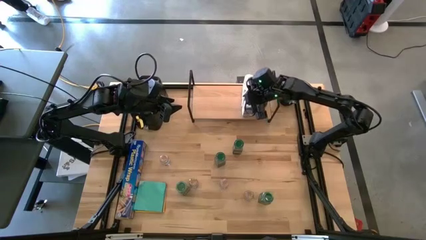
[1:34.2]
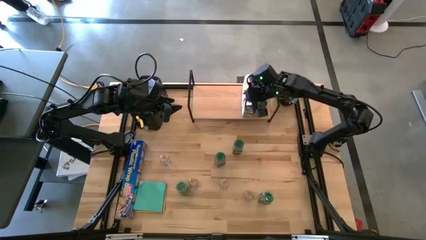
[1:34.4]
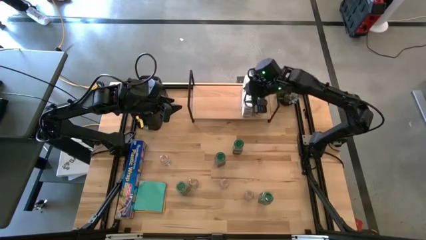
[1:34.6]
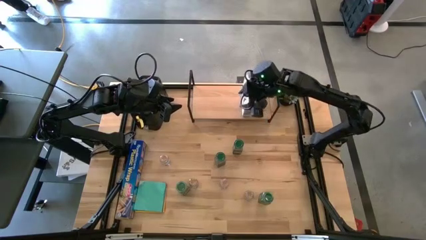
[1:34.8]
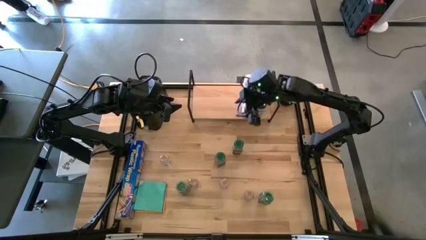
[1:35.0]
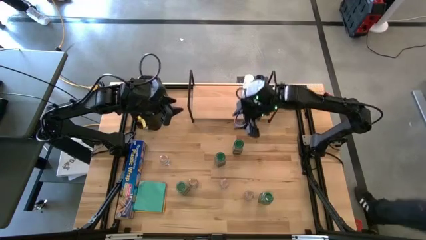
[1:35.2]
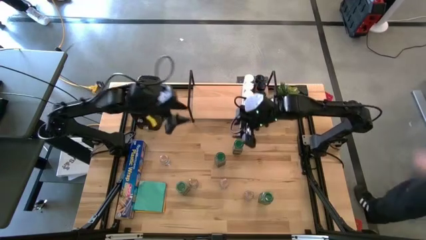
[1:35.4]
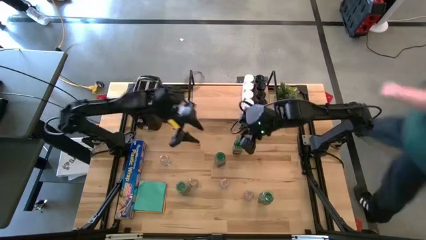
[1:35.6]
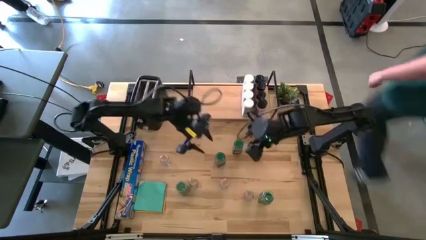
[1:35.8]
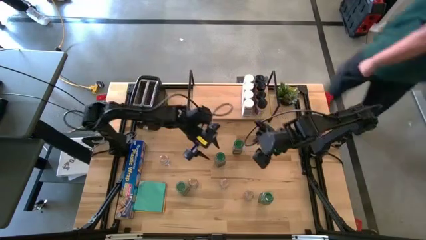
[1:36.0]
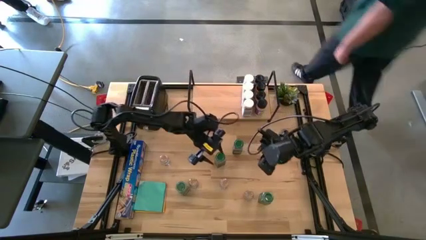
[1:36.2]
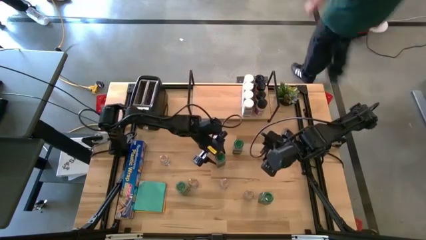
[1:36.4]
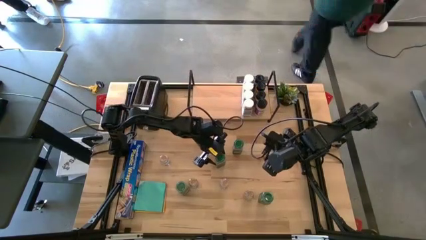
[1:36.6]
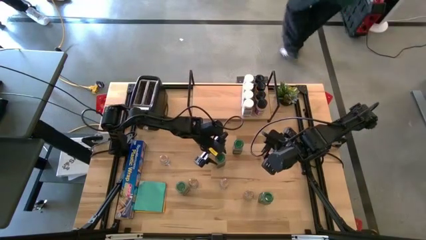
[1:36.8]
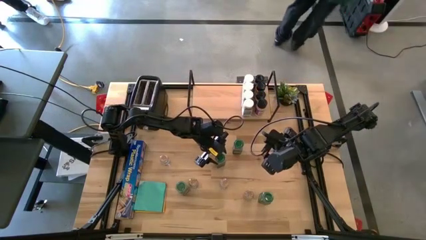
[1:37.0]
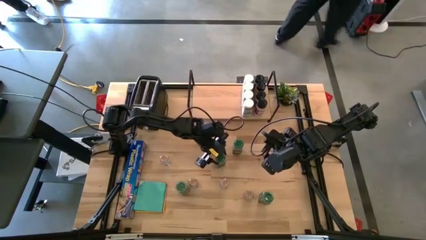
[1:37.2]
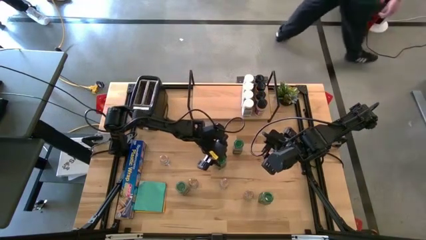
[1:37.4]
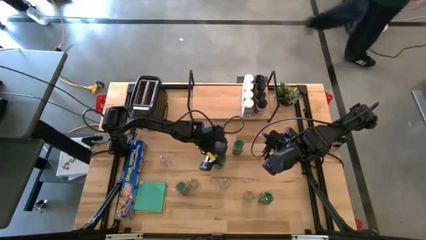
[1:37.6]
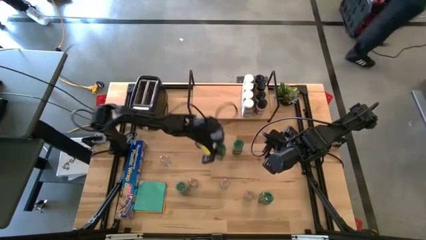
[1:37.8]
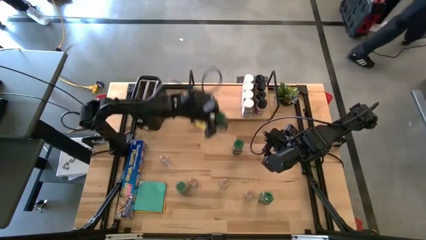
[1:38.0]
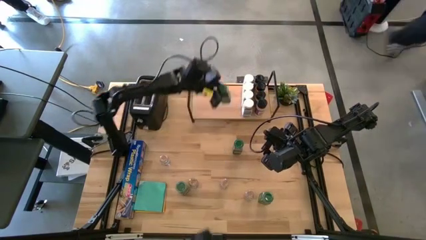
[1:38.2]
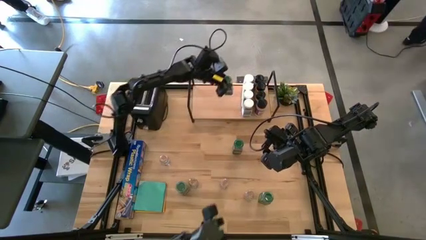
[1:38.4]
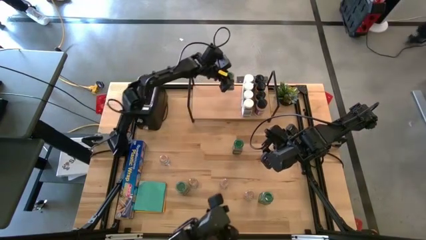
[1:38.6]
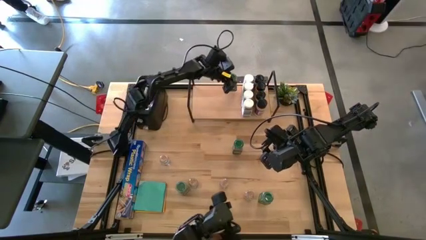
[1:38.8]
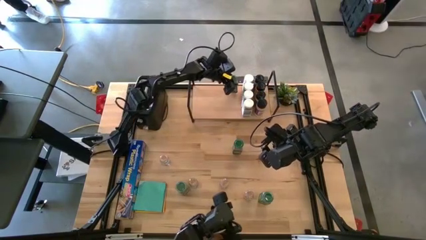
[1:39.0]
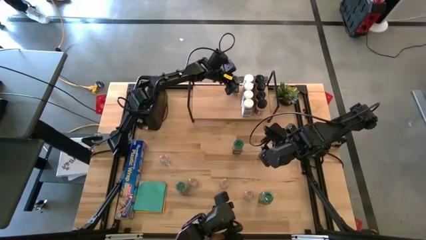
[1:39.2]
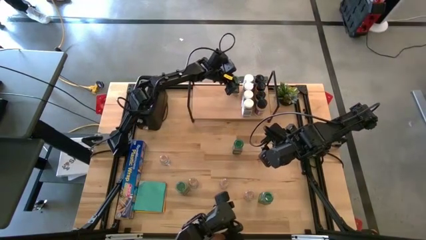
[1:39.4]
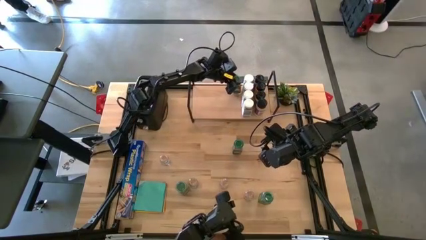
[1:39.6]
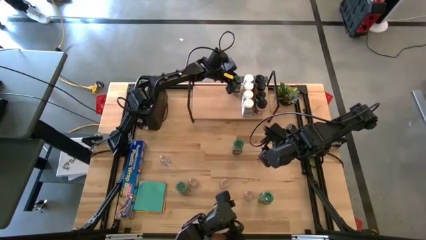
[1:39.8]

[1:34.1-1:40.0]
Task: Shelf spices
Put the middle green spice bottle on the shelf

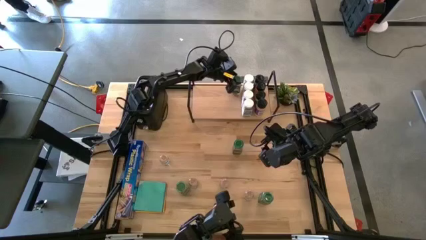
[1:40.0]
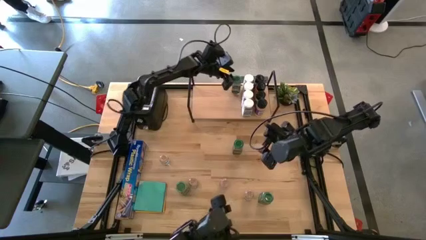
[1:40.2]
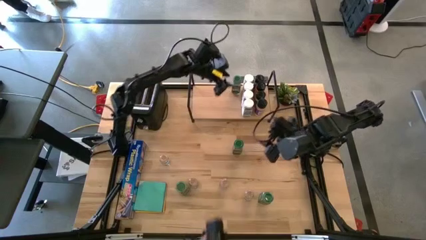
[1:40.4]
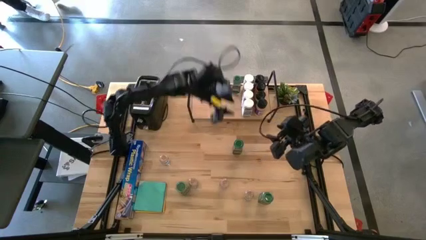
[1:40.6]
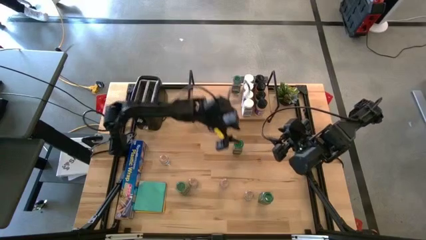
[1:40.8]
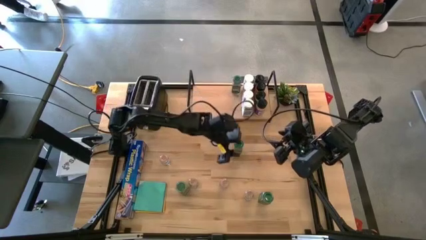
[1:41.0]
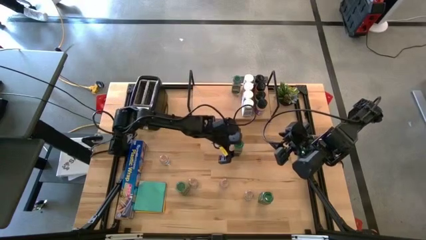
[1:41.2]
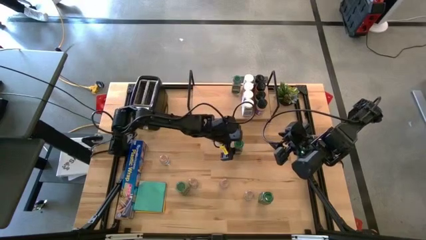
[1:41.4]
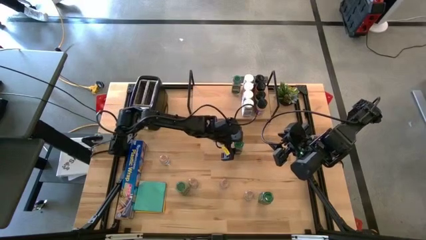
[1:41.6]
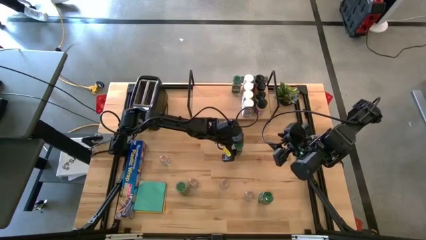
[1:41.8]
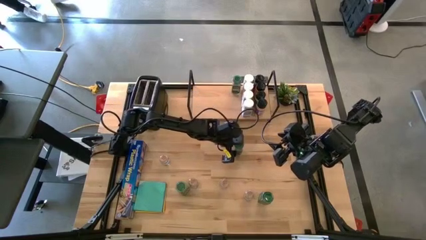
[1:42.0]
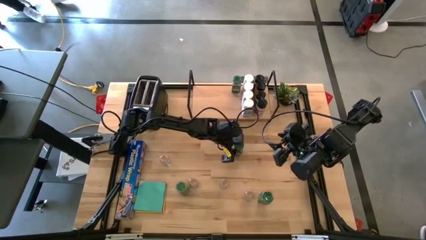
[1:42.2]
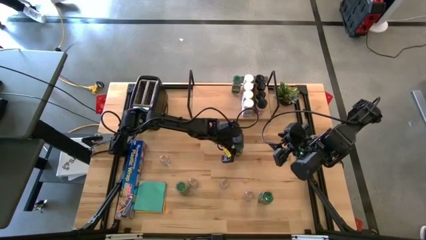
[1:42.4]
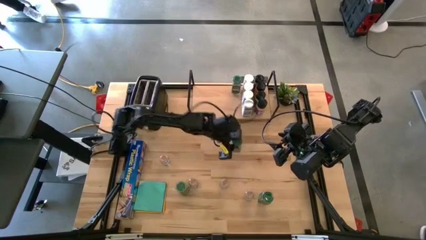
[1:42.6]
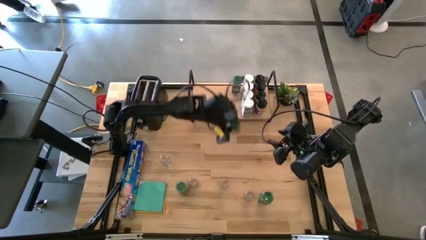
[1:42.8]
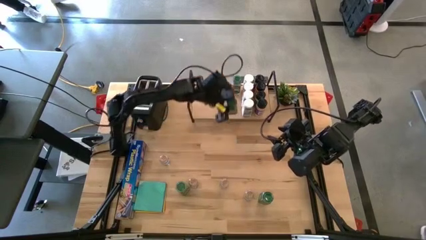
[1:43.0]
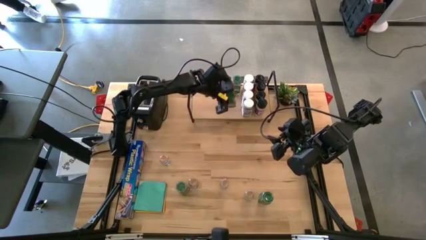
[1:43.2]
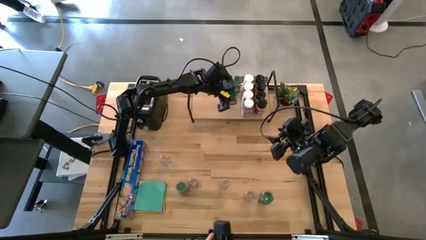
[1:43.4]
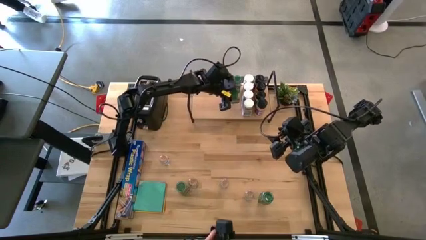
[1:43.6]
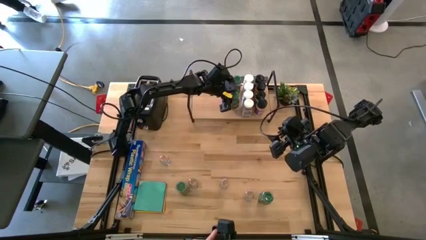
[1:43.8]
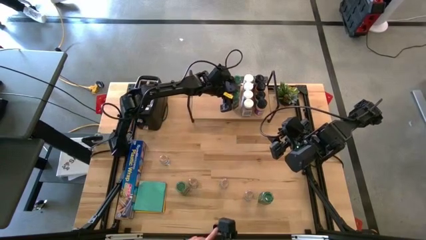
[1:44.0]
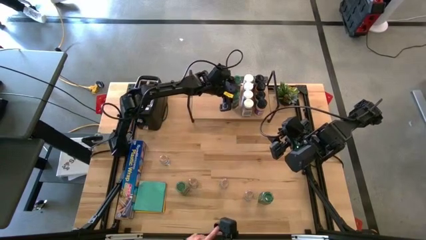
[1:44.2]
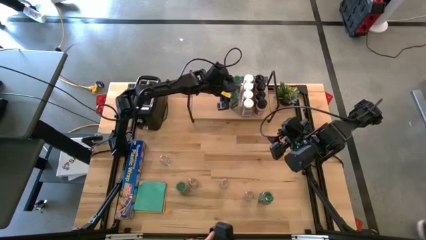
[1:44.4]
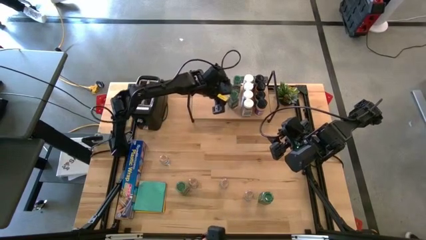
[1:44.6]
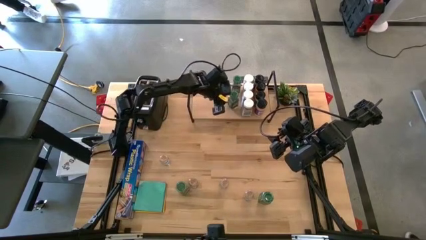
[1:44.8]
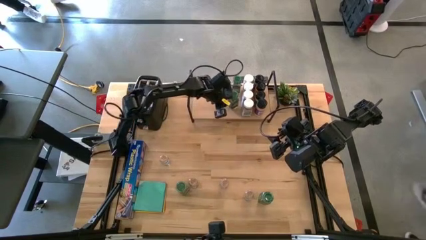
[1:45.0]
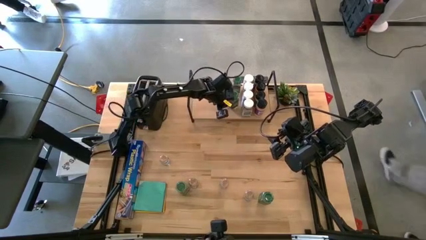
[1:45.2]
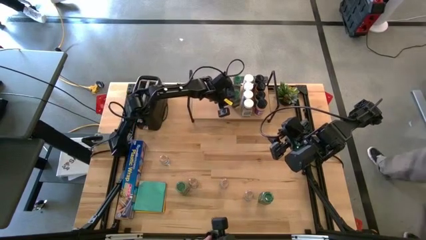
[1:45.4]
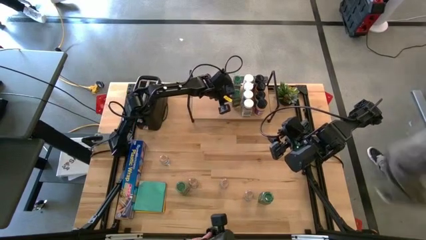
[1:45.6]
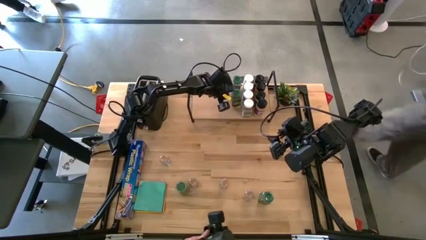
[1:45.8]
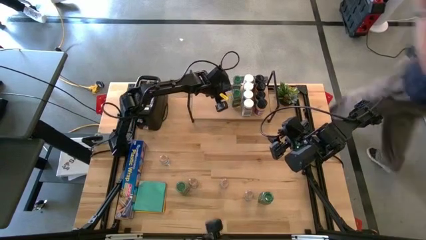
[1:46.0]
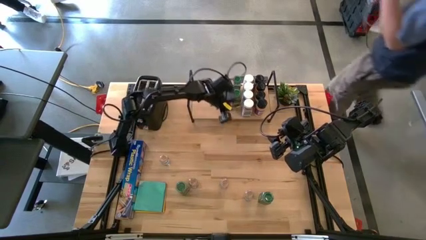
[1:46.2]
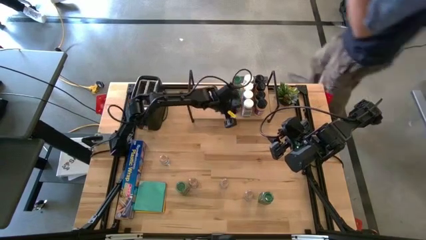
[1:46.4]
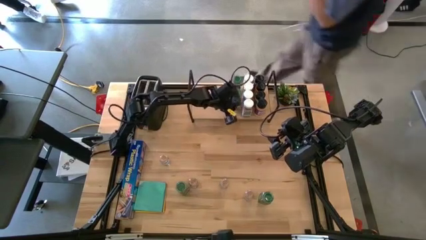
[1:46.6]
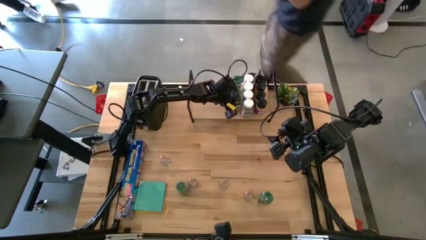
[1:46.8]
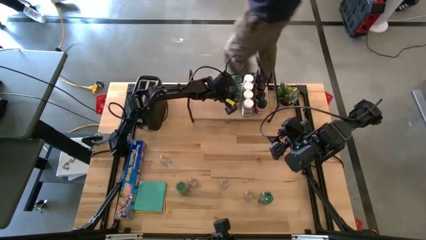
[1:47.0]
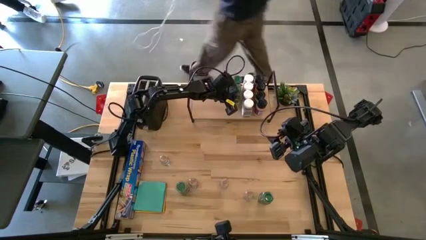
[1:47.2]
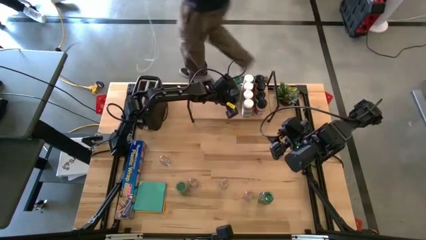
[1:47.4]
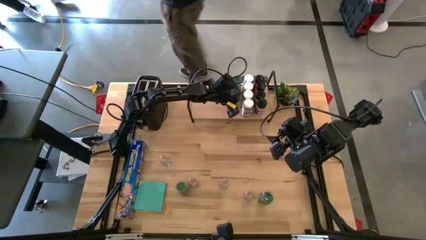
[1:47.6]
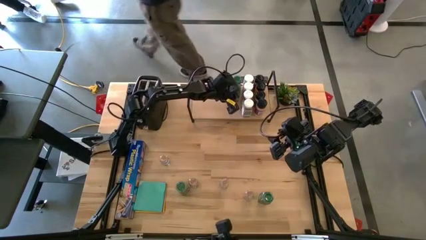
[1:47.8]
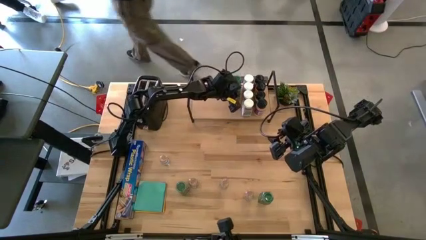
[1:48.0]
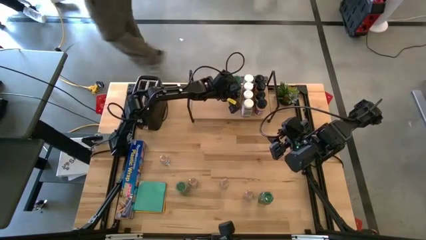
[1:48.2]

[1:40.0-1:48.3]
Put the top green spice bottle on the shelf and align with the other green spice bottle

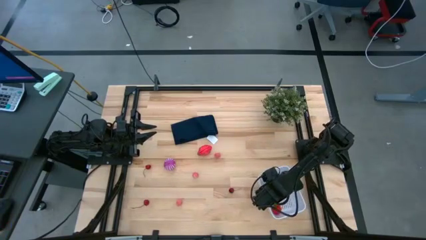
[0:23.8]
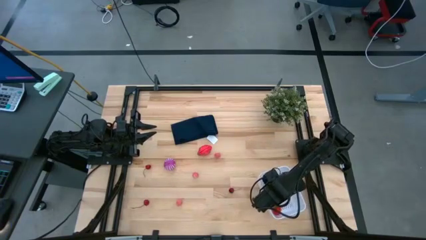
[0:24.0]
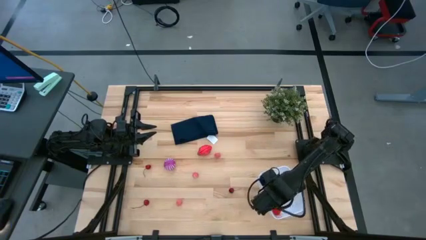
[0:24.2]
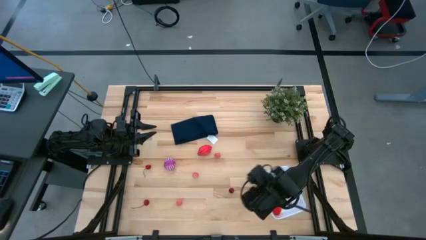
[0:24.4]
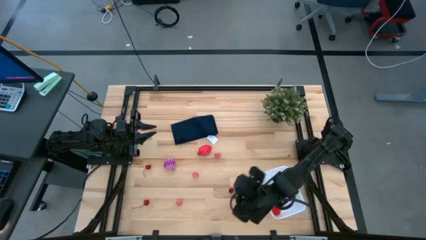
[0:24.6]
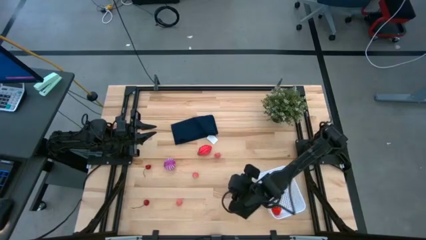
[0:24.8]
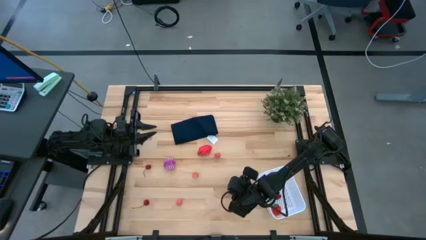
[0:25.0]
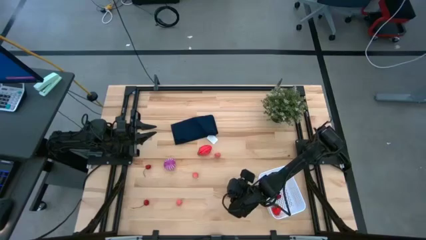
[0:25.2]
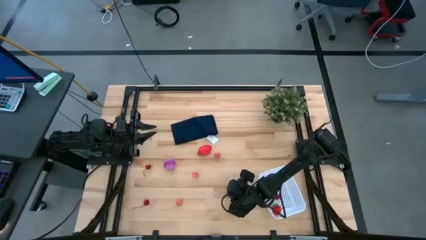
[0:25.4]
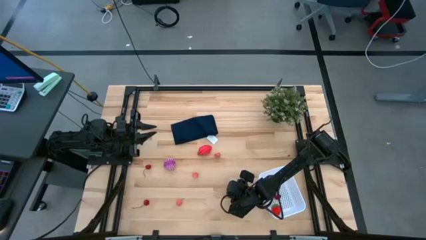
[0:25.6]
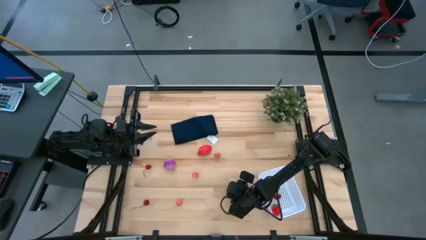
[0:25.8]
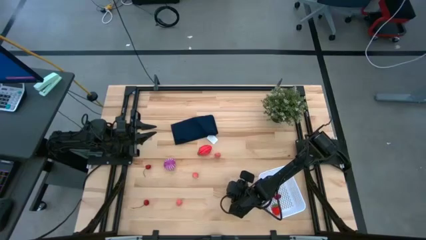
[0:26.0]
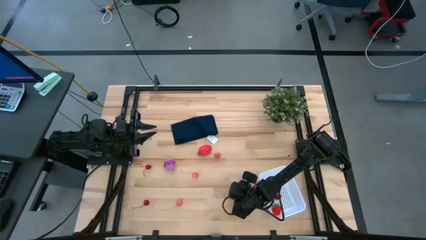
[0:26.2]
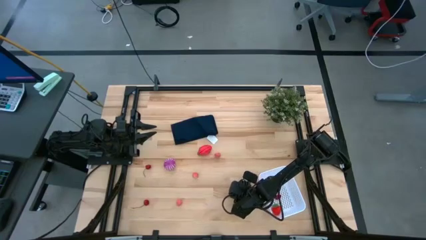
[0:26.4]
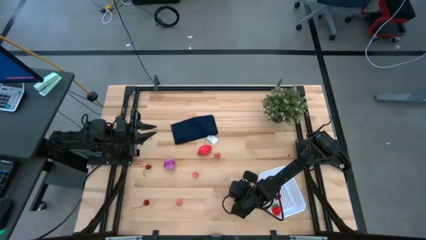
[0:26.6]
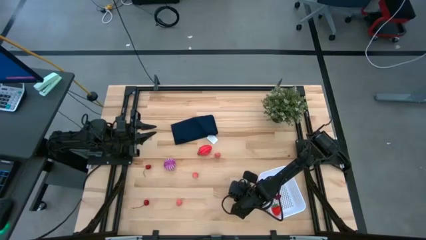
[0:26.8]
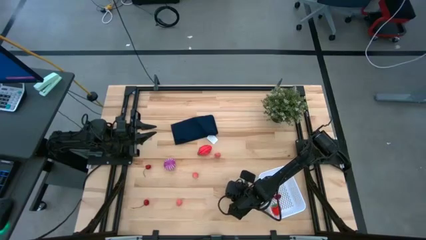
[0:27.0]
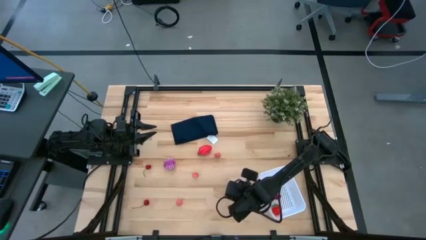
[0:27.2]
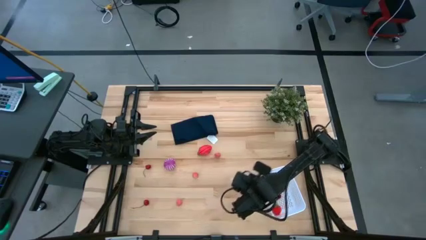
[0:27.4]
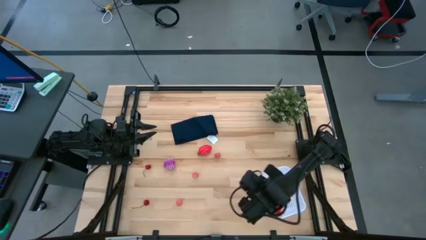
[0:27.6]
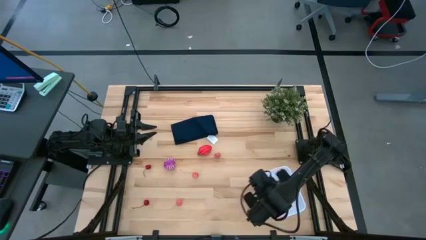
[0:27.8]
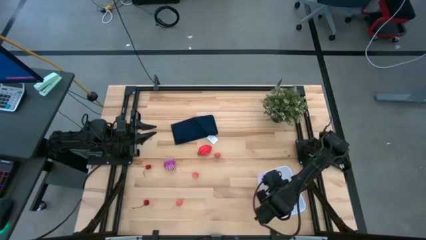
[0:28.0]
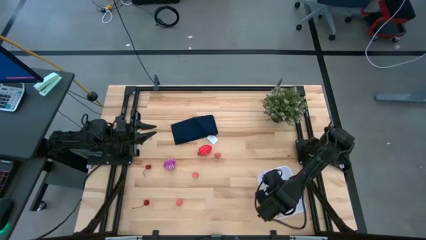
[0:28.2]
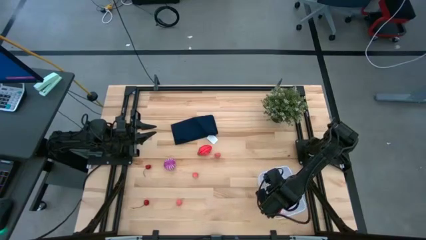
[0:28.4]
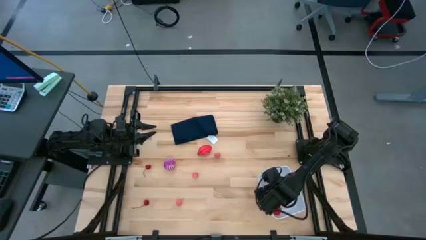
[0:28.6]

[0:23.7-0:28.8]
Task: Pick and placing Produce into tupperware
Put the cherry into the white bin
